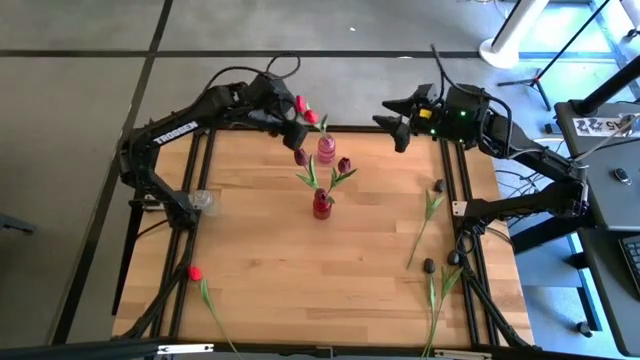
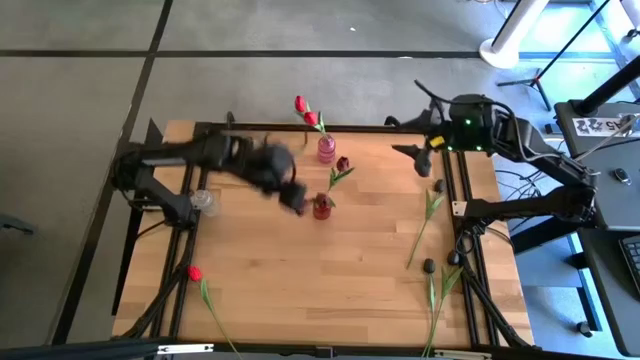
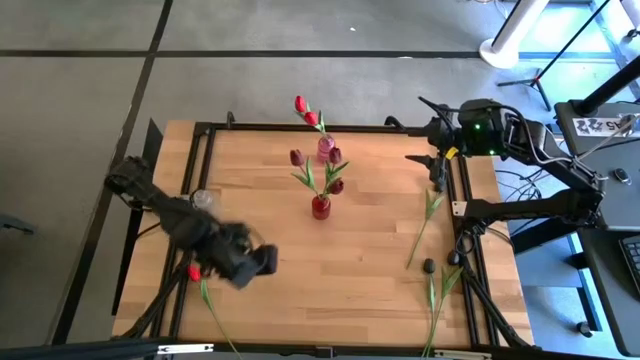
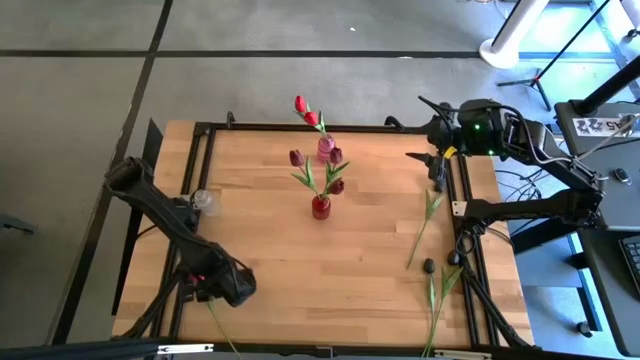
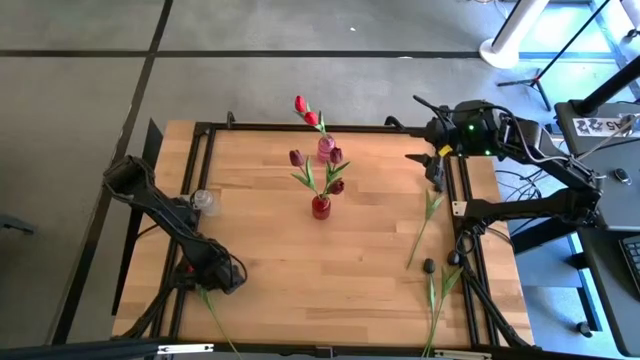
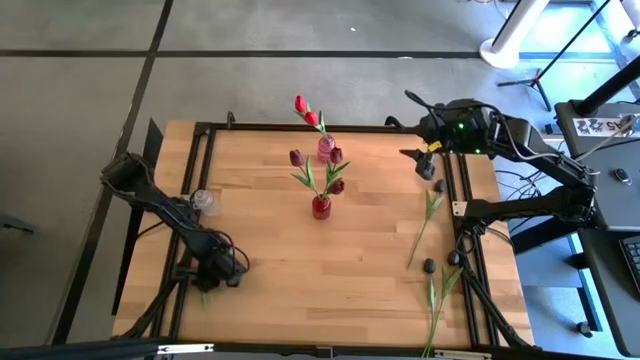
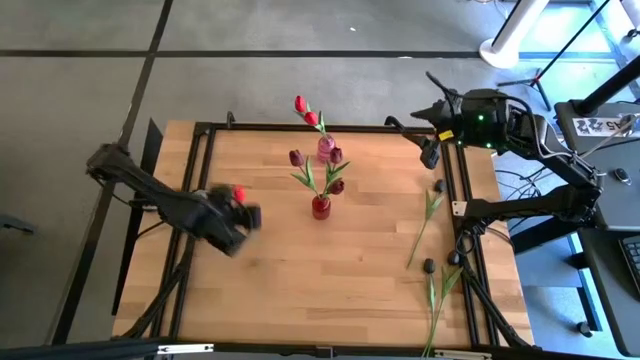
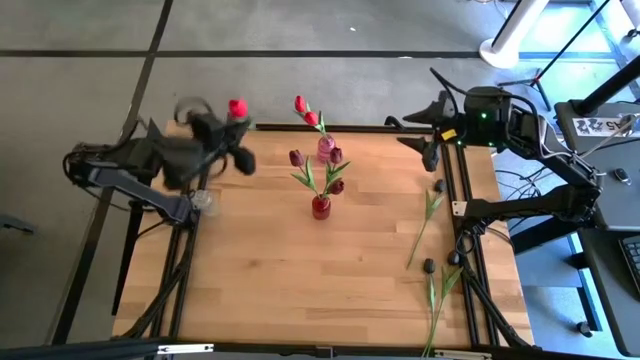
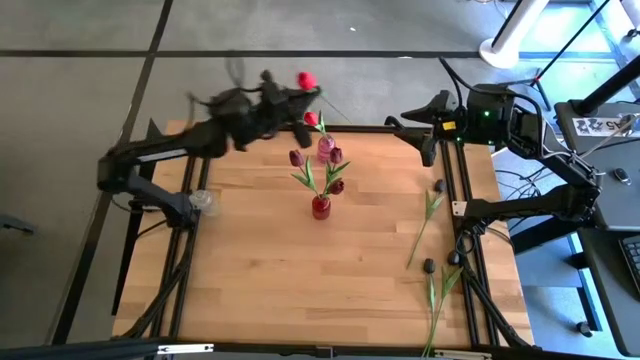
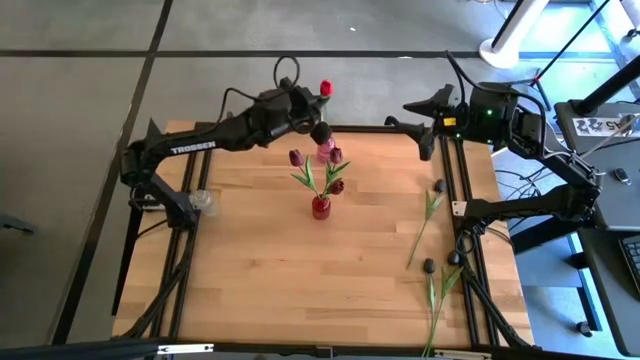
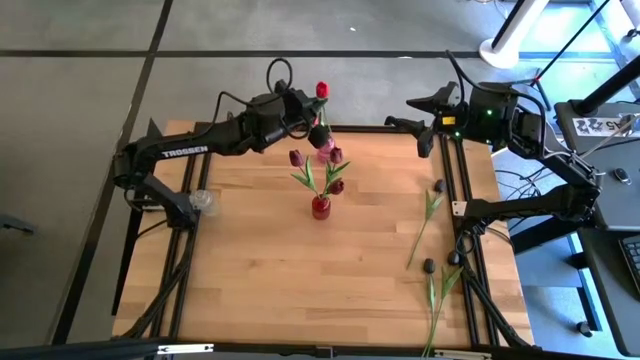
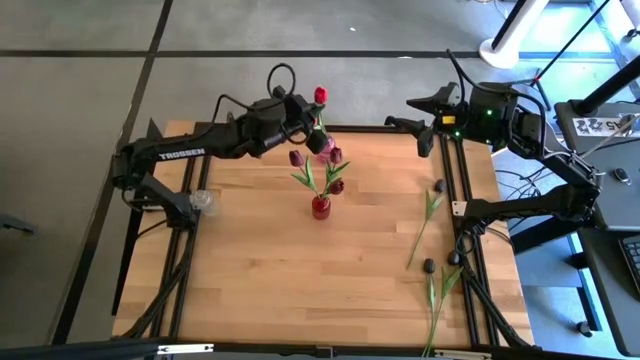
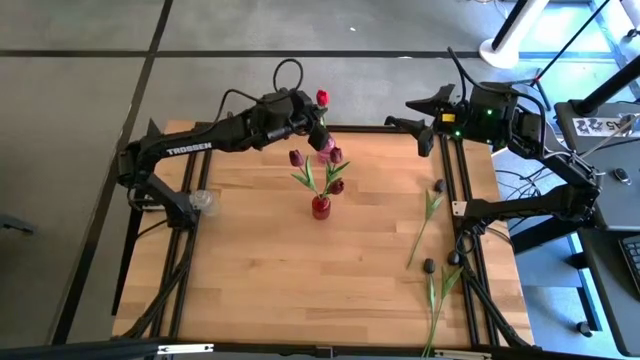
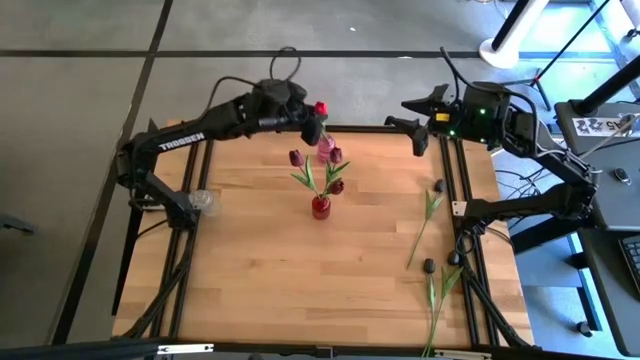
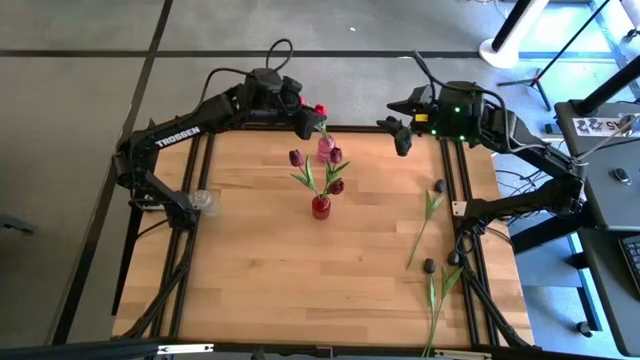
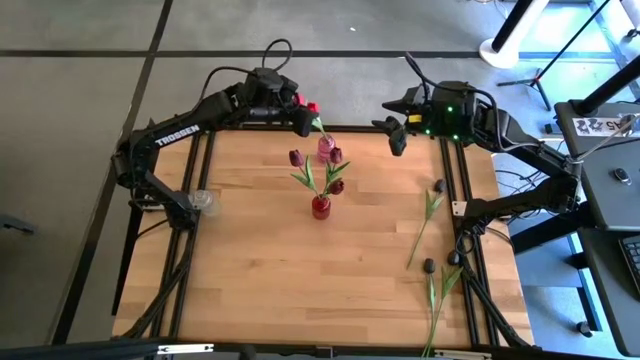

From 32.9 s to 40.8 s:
Task: Sort flowers into vase by color
Put the red flower into the purple vase

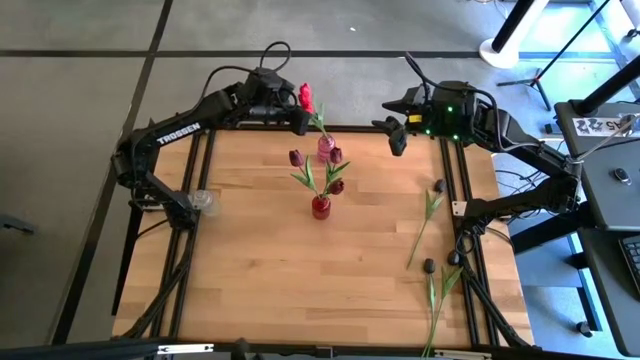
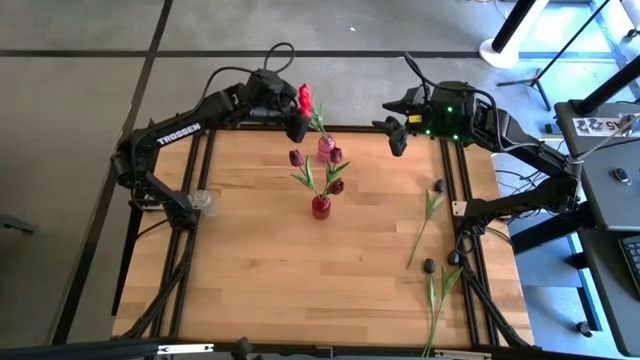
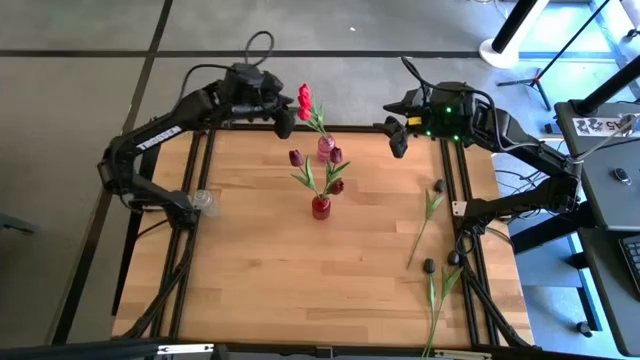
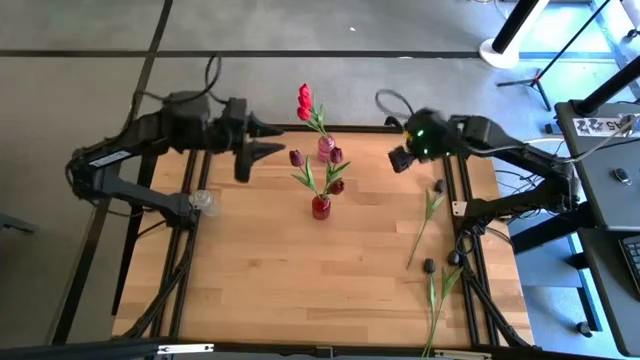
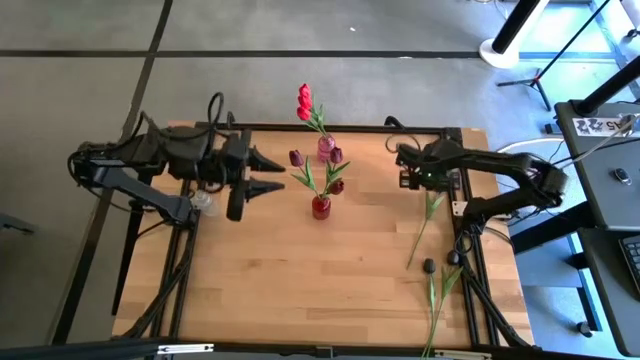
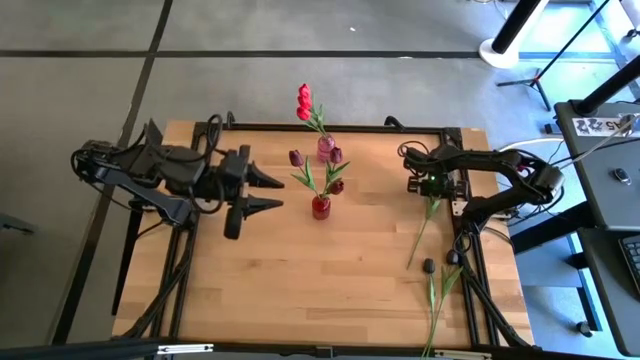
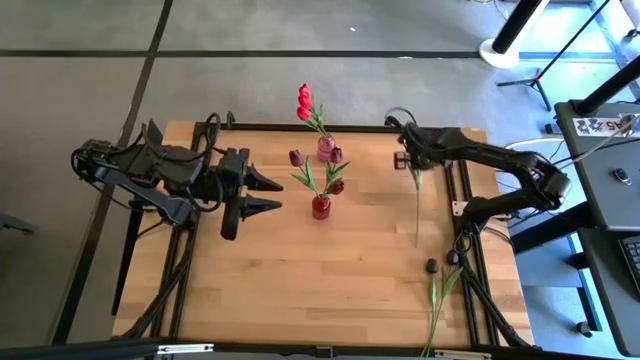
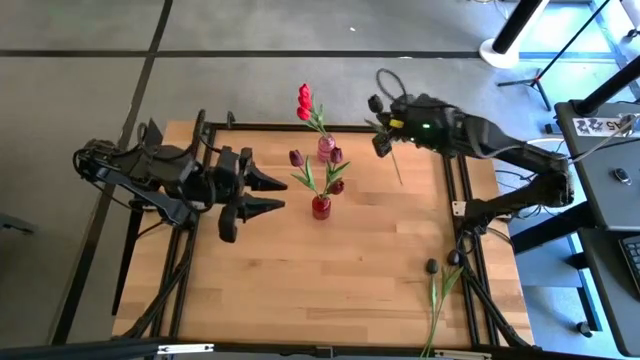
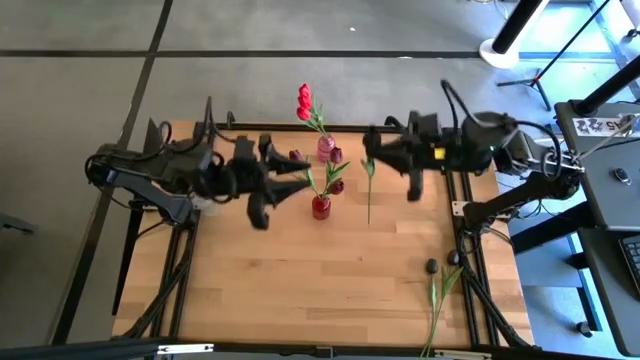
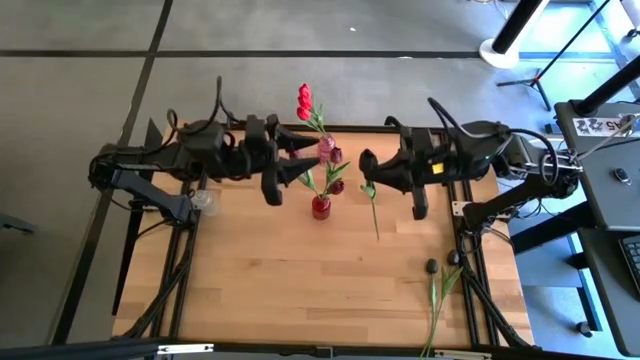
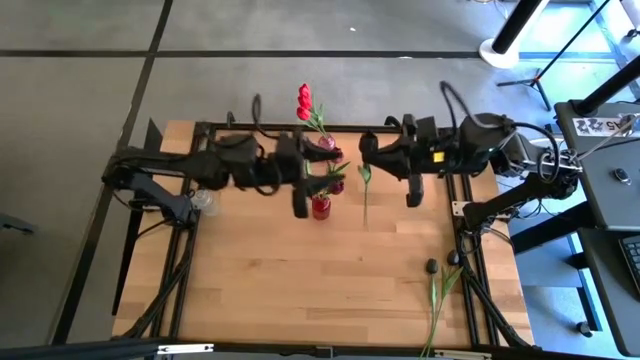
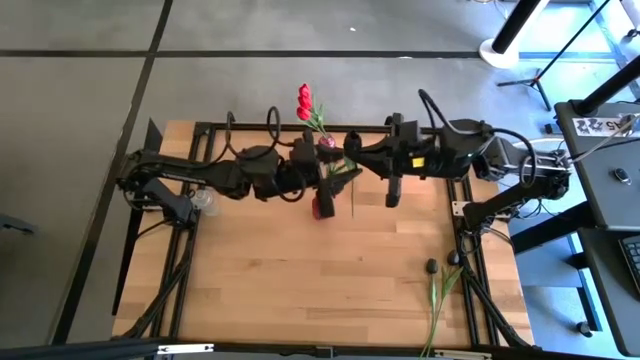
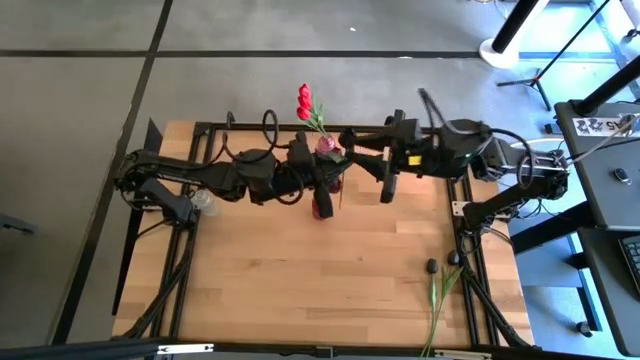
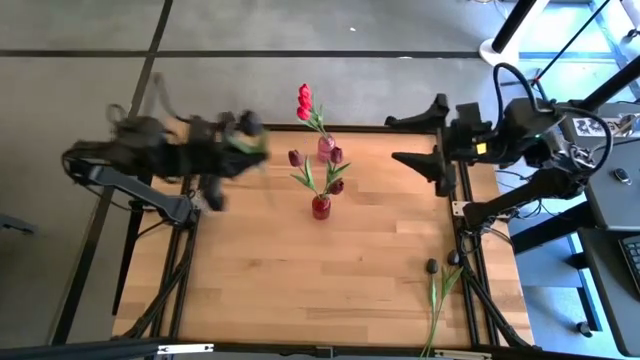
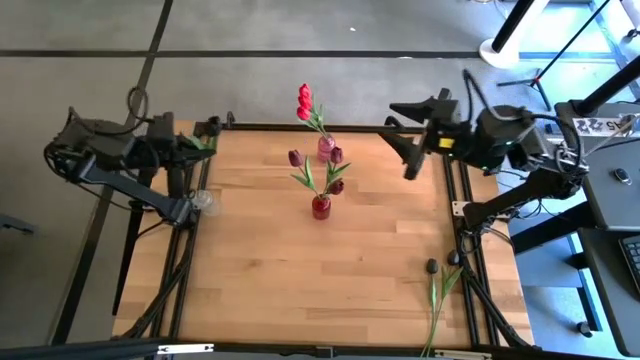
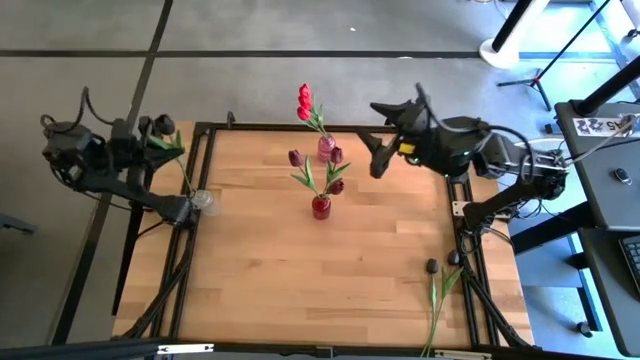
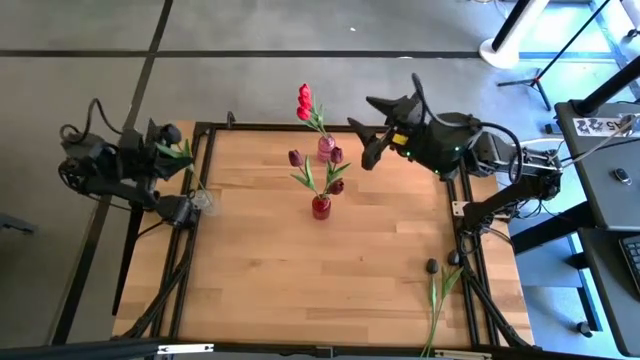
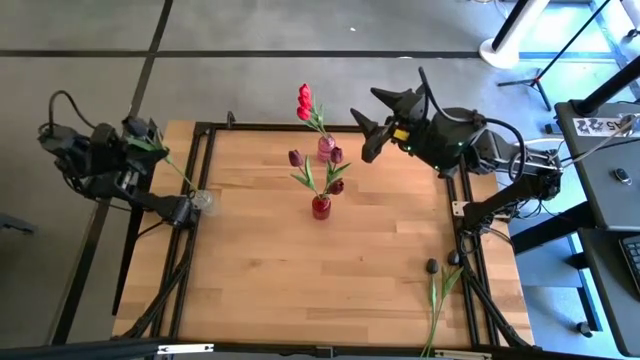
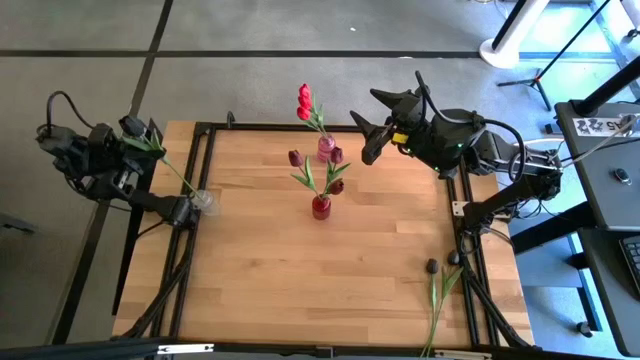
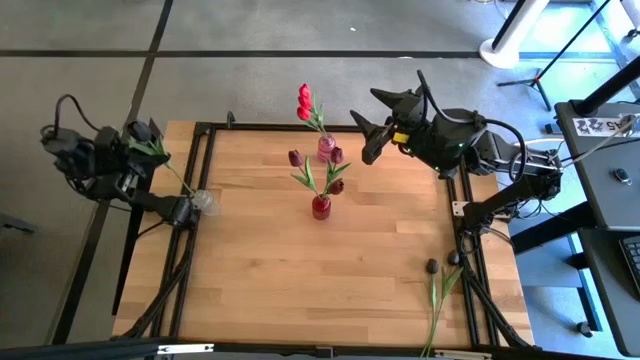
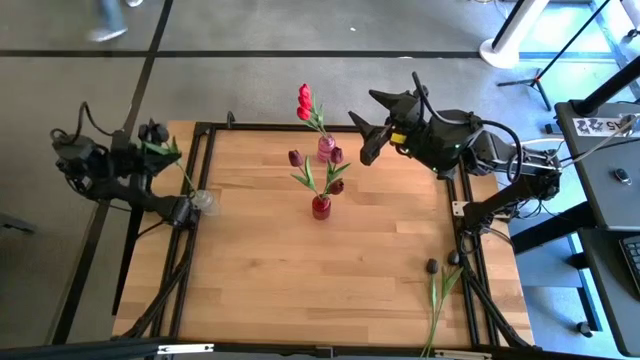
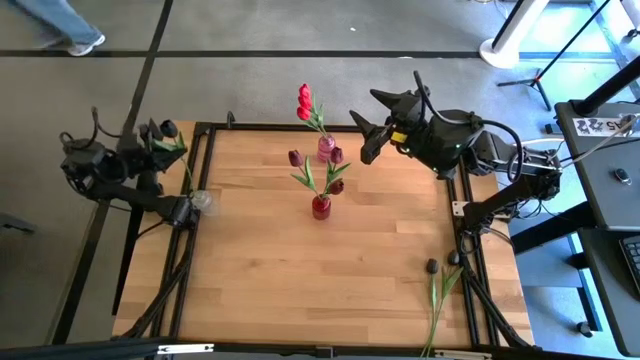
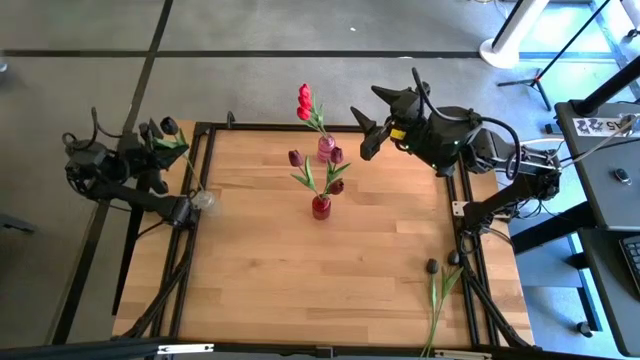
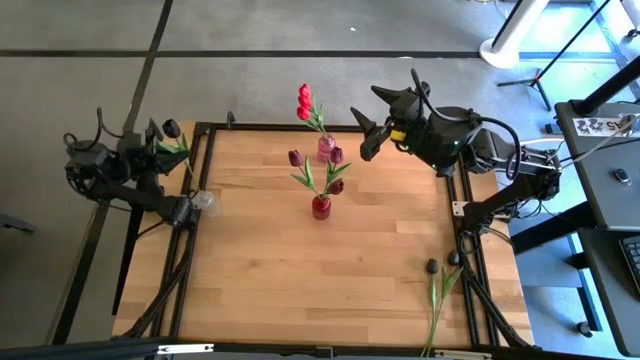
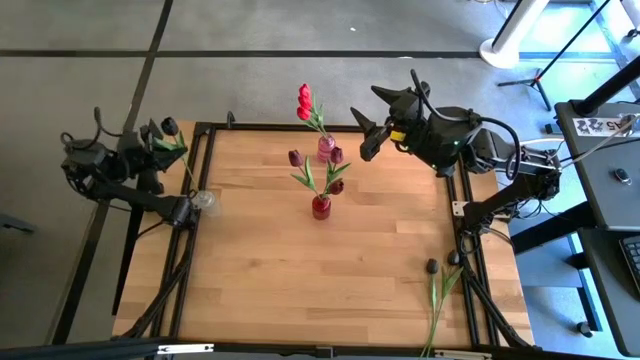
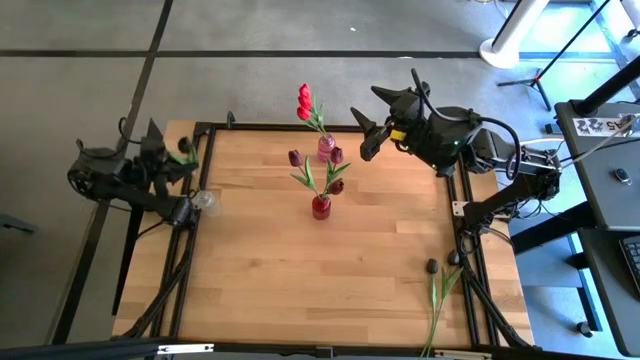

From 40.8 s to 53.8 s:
Put the top black flower into the transparent vase
